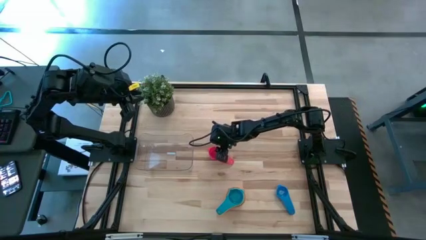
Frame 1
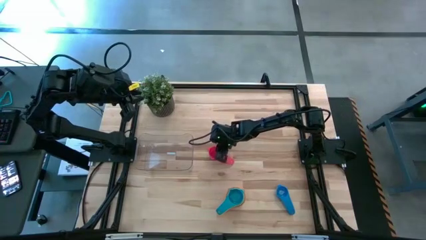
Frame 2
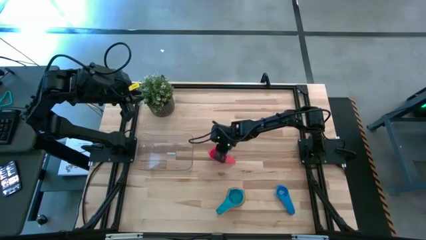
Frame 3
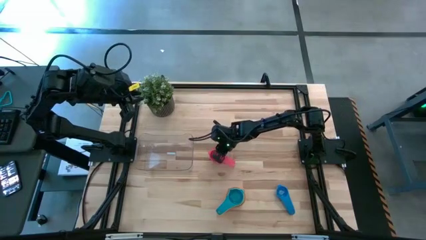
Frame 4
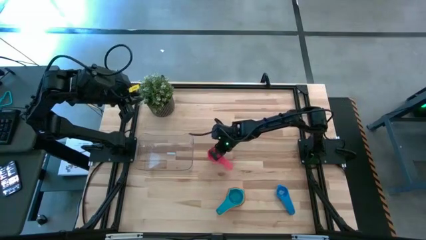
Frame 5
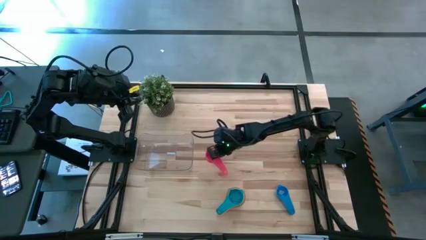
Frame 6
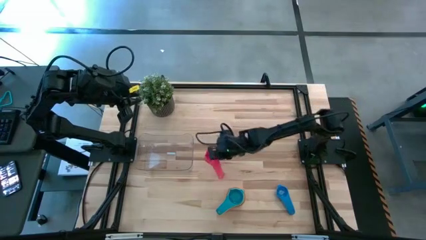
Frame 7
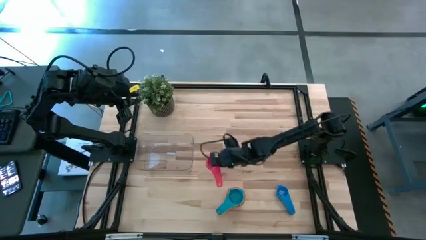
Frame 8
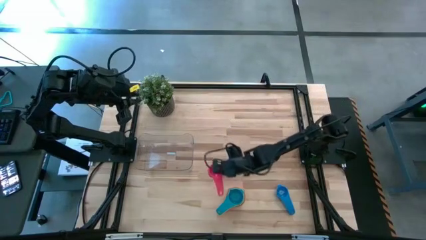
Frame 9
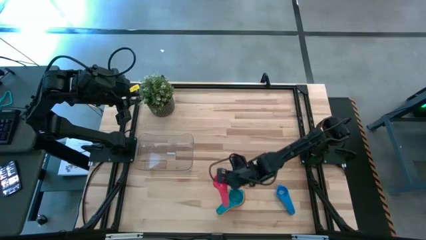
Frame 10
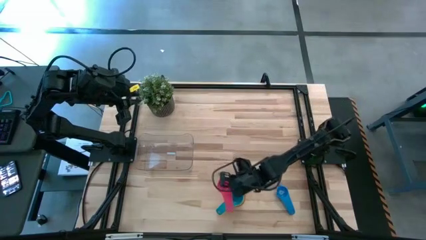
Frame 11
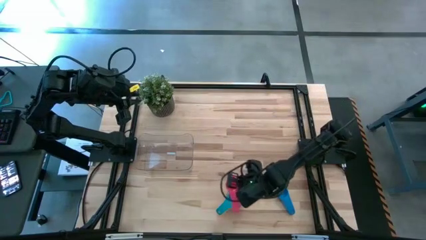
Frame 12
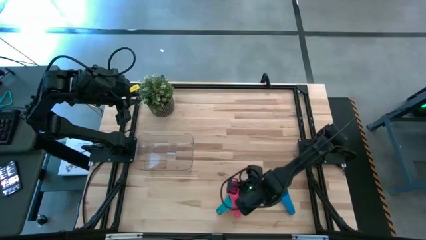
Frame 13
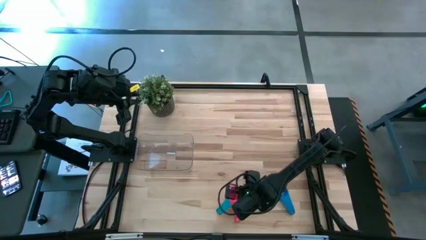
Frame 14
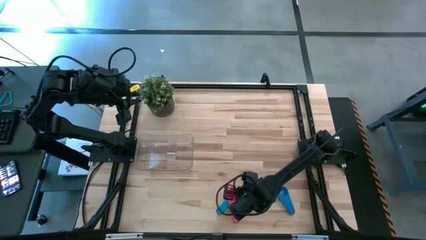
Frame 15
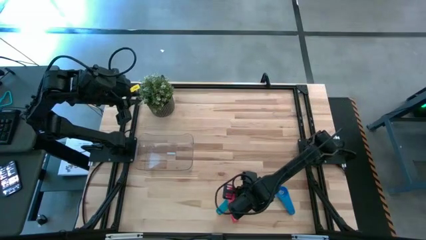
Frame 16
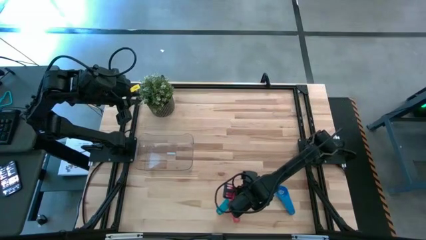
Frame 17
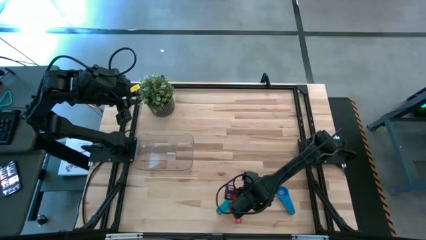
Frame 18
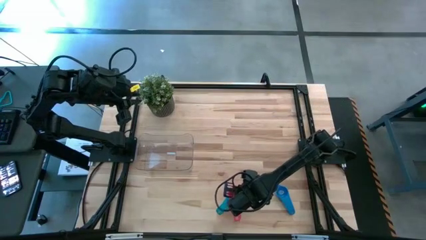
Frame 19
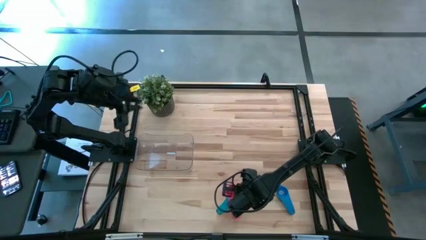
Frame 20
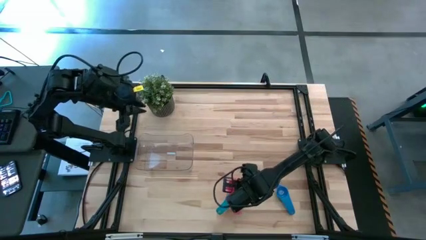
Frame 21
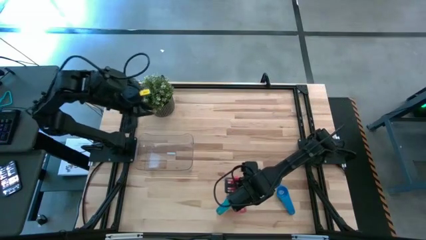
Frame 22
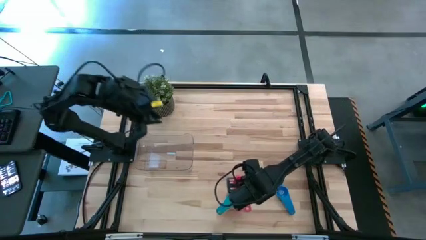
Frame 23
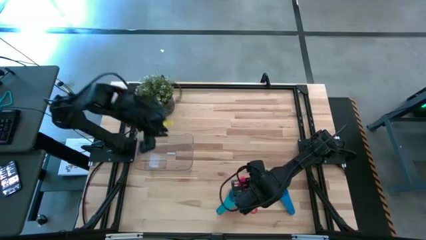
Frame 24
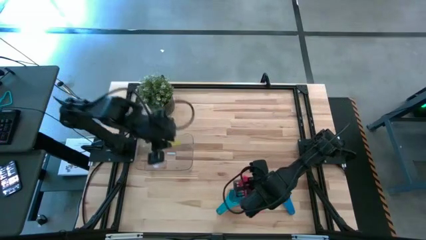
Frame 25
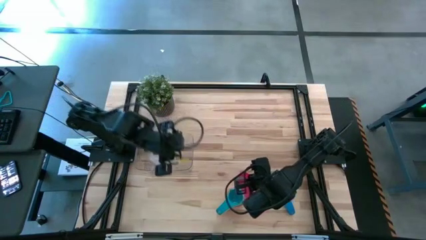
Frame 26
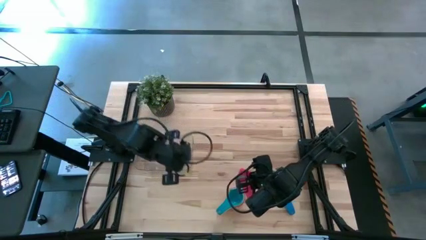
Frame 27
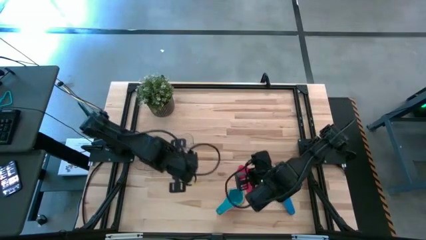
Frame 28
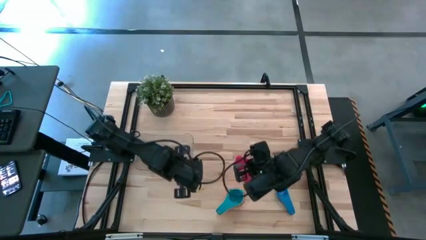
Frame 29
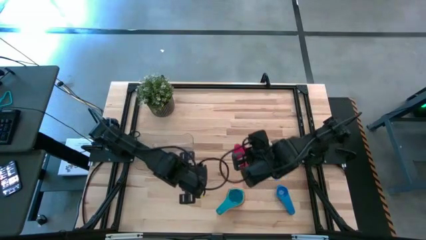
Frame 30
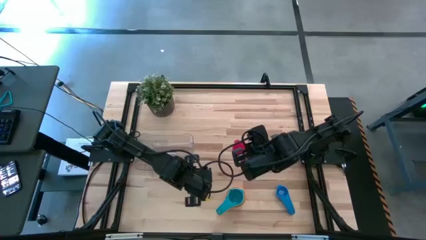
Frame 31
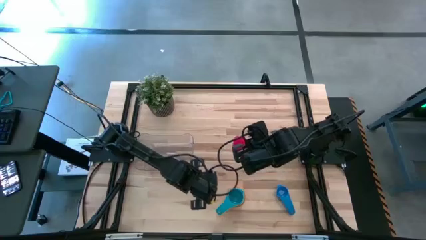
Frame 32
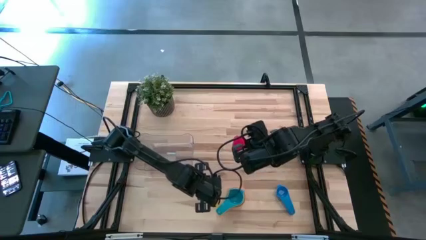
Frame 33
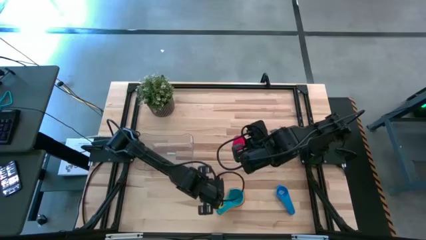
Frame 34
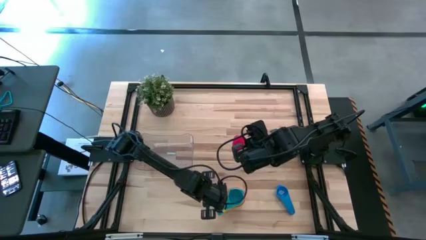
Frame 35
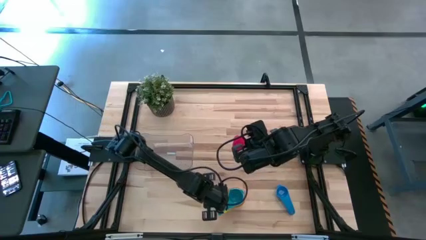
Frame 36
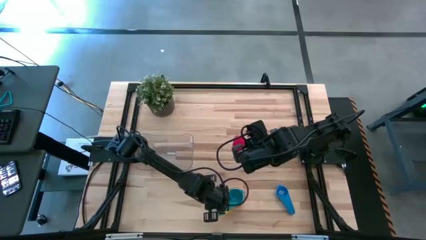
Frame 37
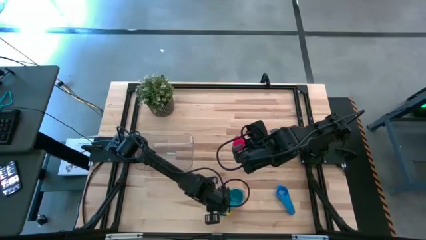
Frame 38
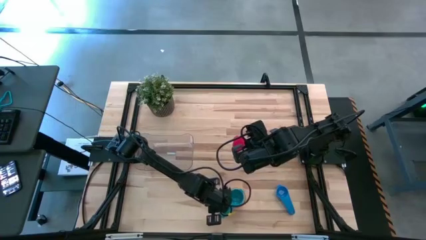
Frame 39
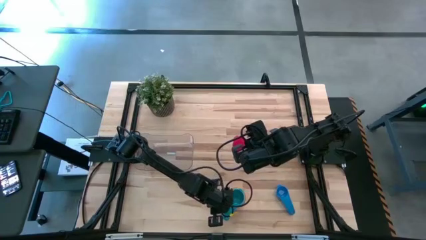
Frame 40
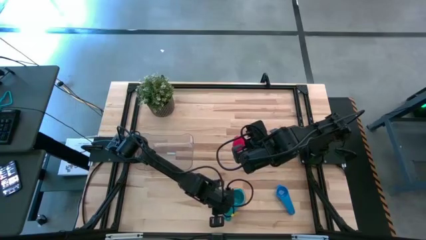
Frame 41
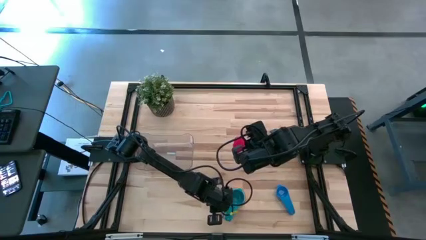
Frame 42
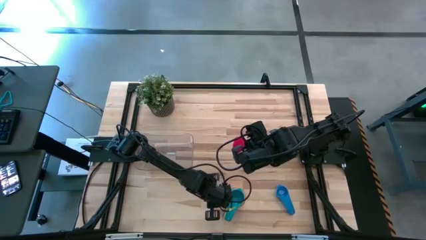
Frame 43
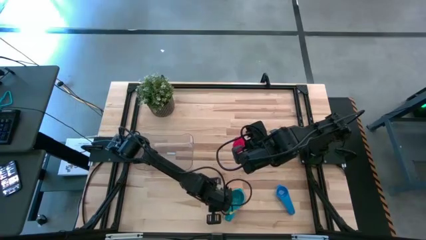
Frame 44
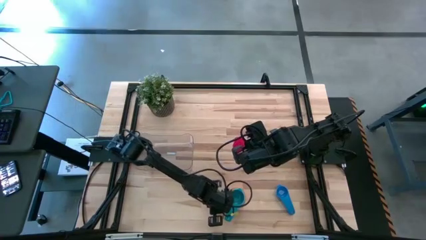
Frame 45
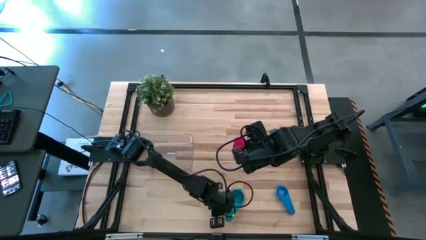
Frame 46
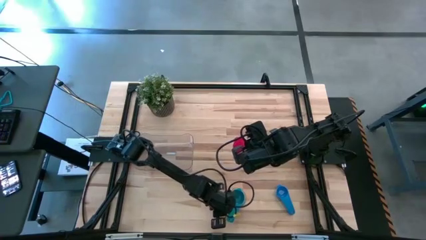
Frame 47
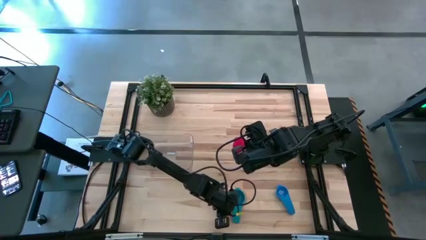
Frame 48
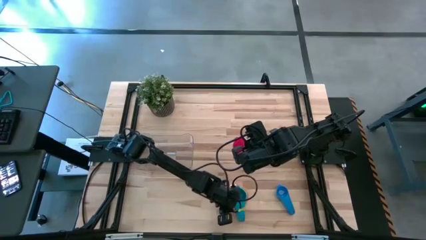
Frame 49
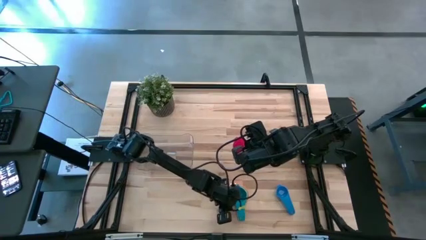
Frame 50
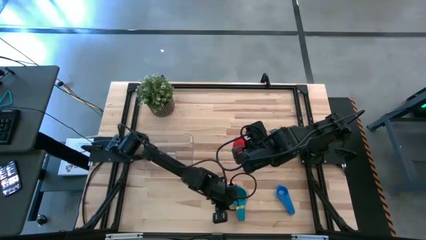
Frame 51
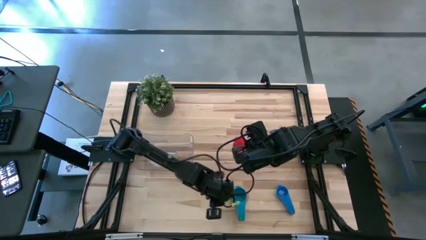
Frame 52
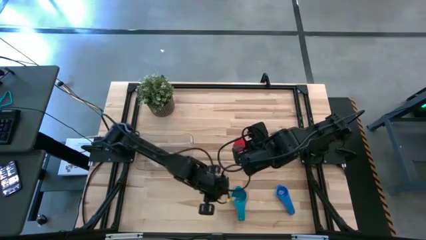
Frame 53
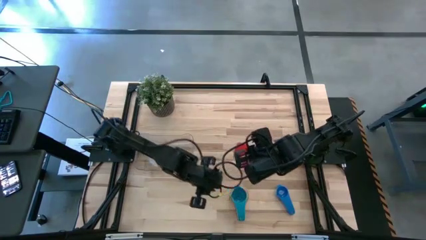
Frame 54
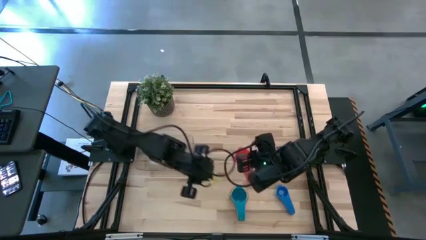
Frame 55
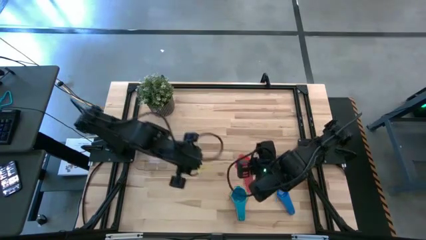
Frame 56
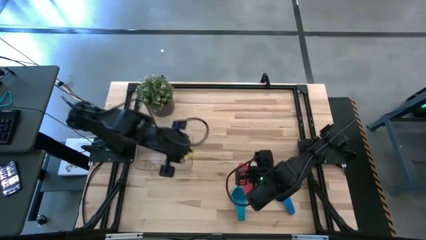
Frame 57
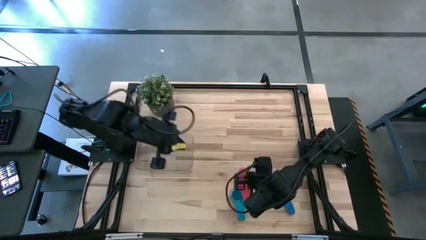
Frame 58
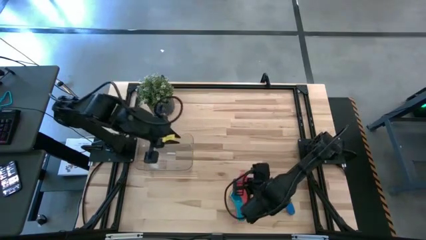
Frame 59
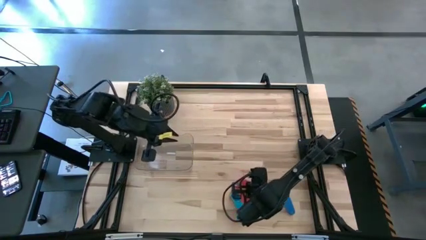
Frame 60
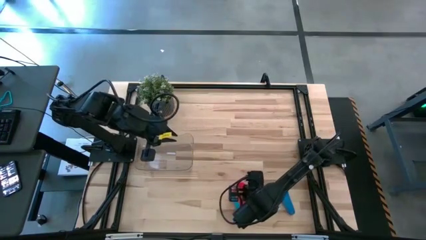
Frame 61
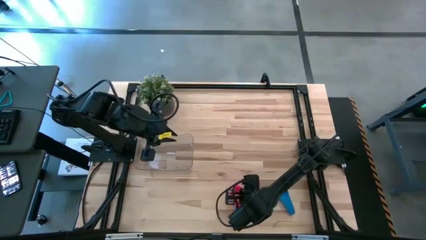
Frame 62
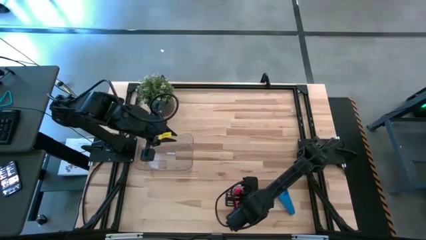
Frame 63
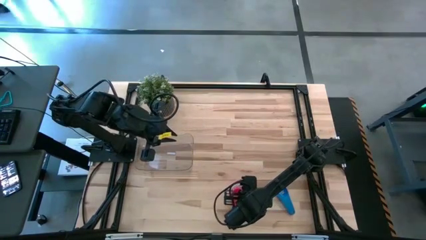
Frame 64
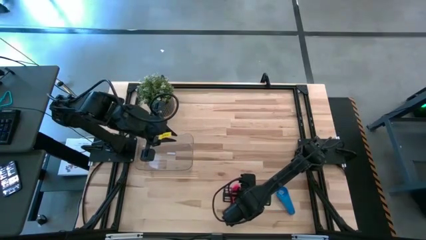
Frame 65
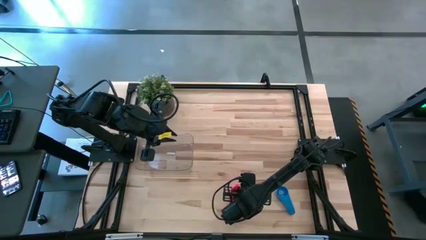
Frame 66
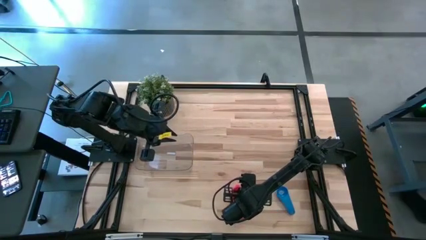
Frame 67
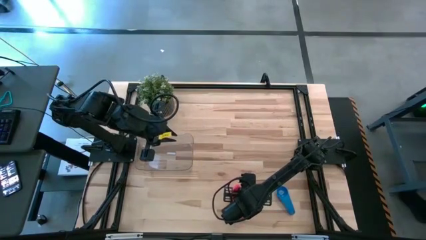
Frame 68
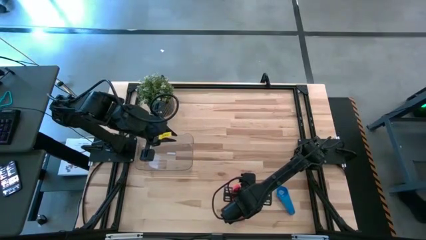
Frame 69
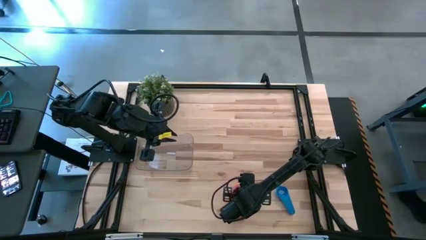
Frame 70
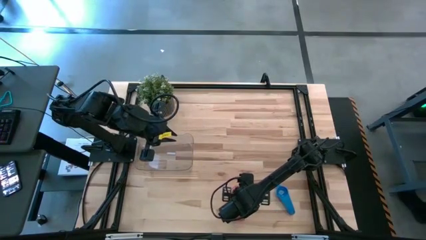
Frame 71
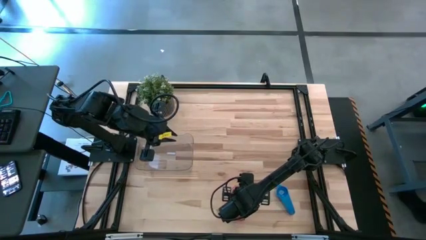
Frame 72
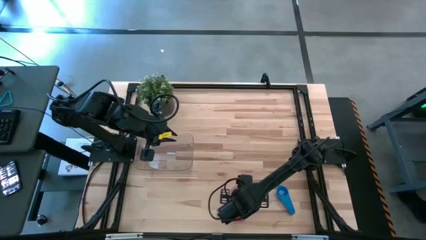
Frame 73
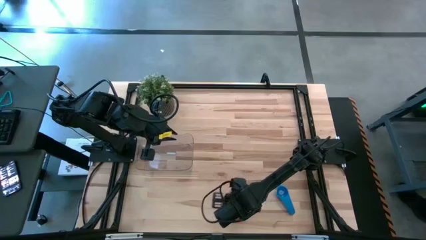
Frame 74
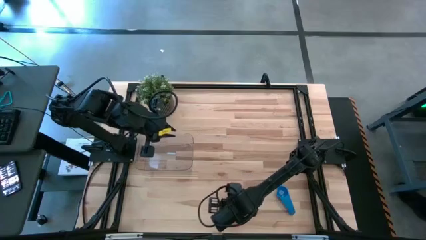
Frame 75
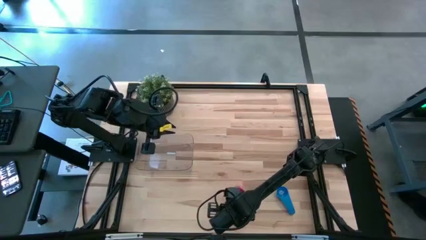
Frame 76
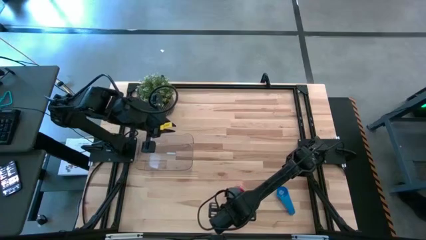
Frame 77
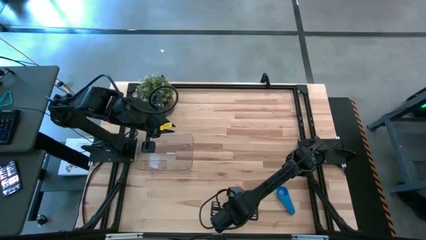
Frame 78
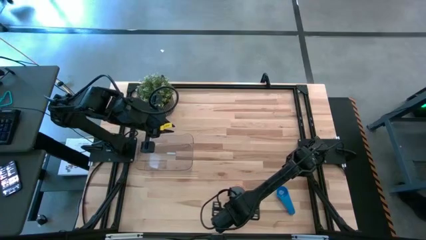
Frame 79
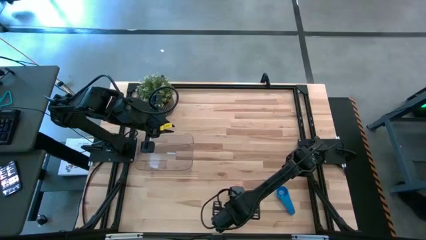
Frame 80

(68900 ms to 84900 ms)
Task: Nest measuring cups in basket
Stack the red measuring cup on top of the light blue measuring cup

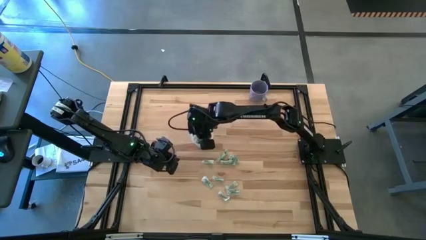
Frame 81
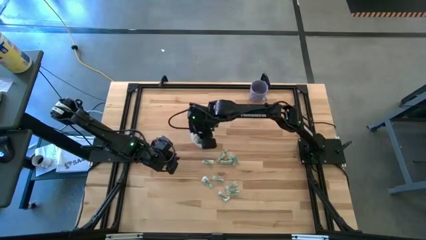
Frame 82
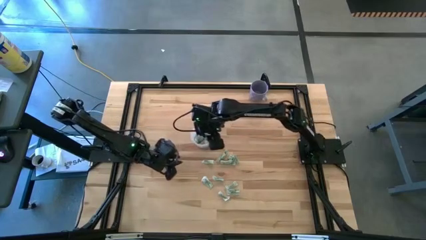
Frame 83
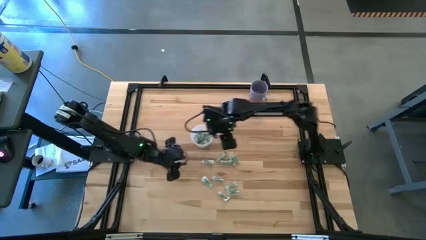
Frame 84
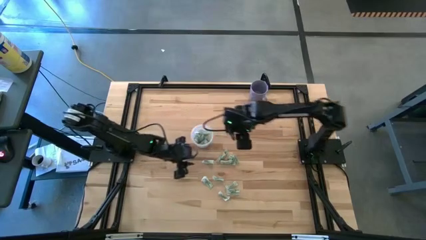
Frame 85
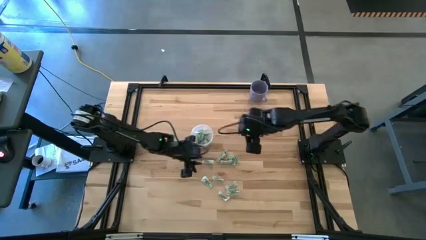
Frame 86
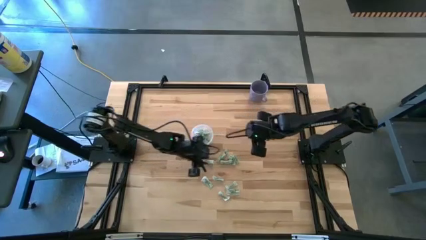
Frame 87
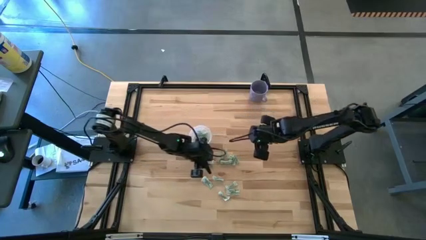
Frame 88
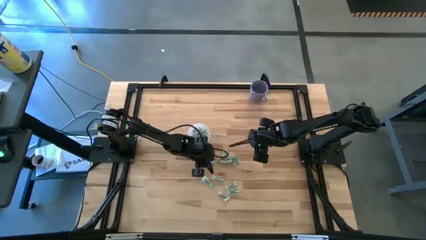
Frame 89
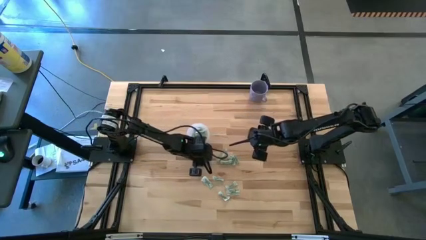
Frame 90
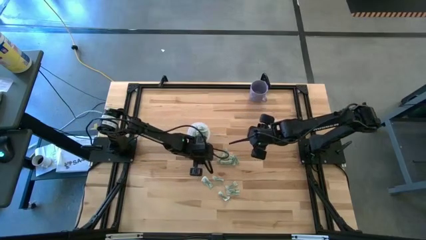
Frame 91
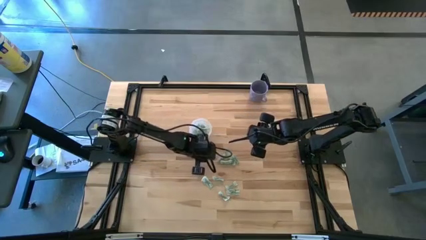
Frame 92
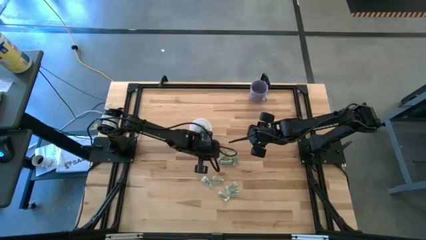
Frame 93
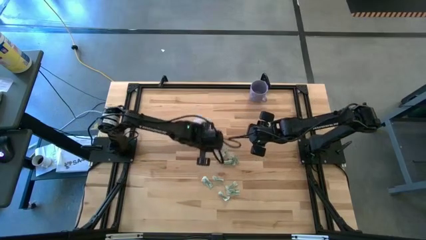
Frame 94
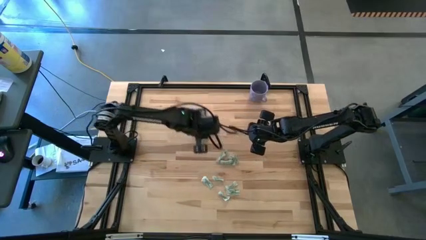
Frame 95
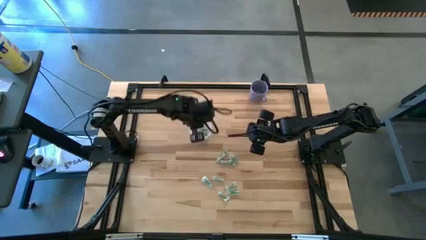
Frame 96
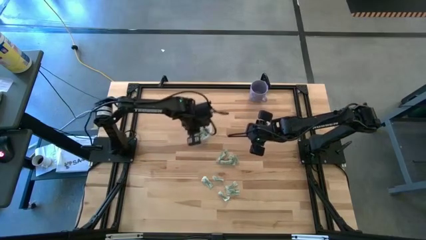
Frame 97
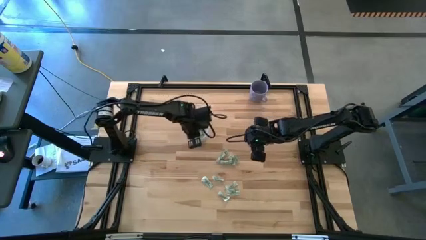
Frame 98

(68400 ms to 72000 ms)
Task: Pick and place Stevia / Truvia into bins
Put the white stevia packet into the transparent container
